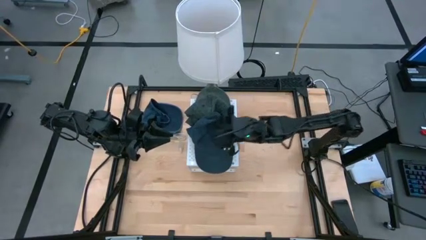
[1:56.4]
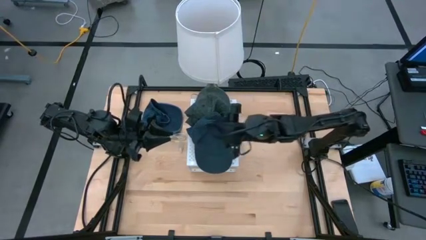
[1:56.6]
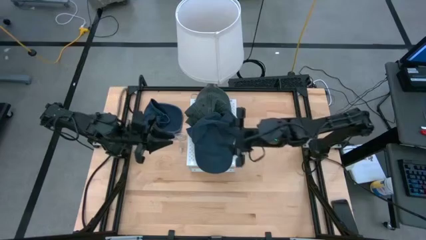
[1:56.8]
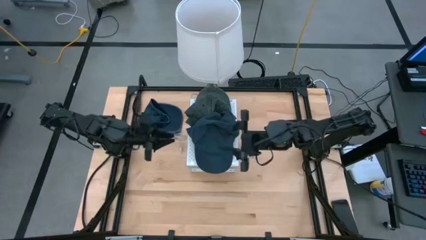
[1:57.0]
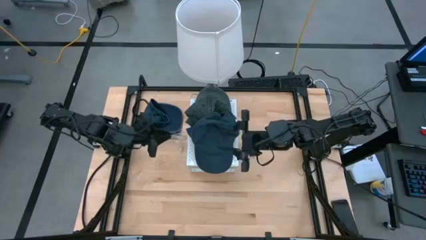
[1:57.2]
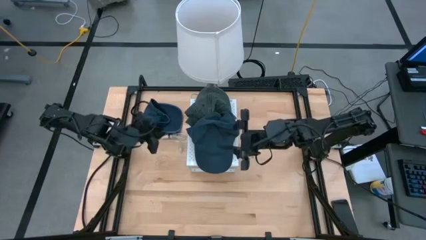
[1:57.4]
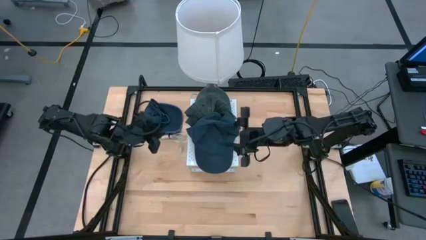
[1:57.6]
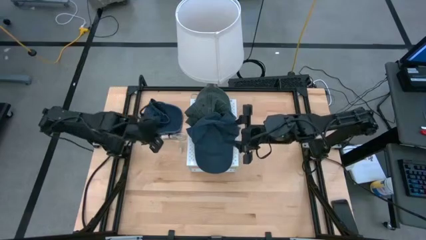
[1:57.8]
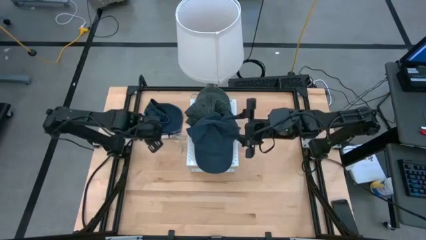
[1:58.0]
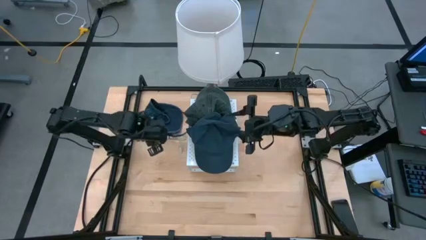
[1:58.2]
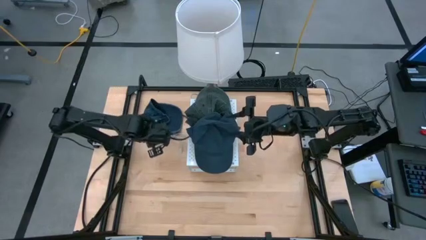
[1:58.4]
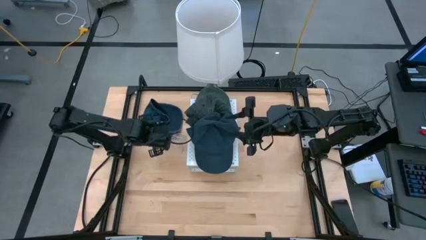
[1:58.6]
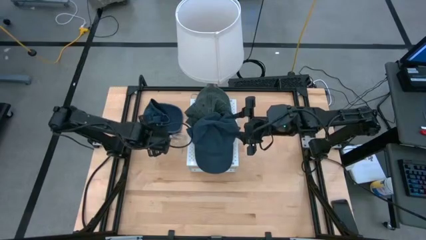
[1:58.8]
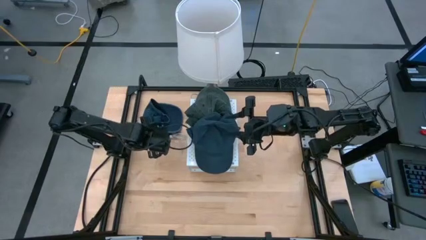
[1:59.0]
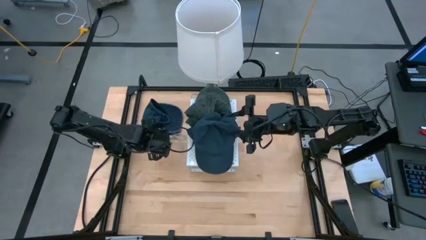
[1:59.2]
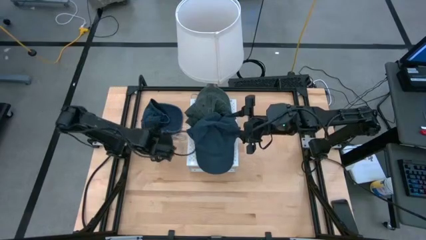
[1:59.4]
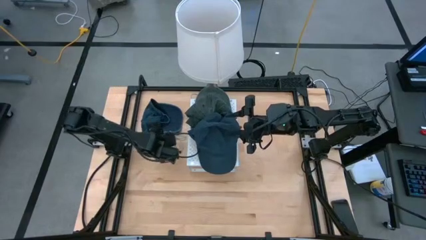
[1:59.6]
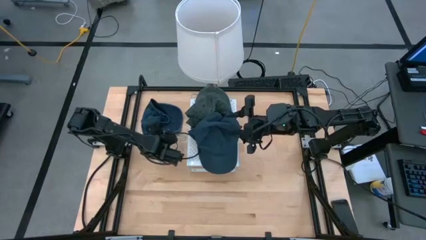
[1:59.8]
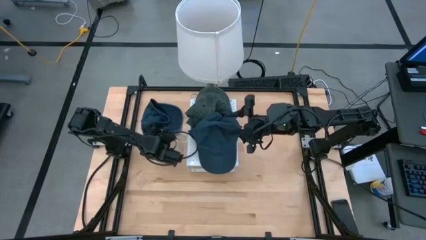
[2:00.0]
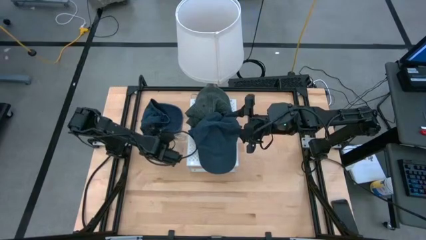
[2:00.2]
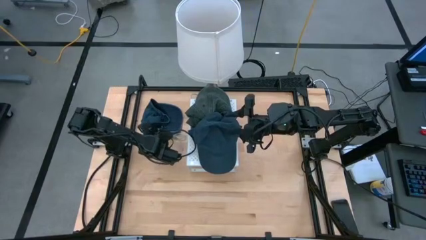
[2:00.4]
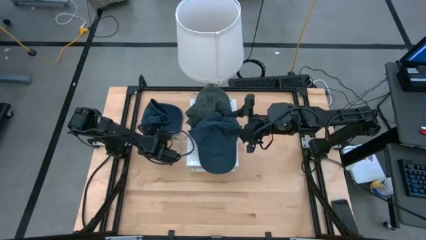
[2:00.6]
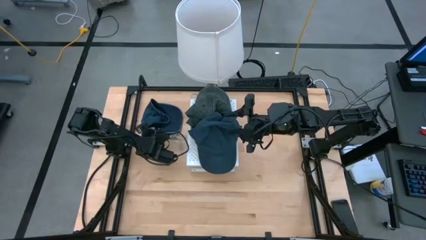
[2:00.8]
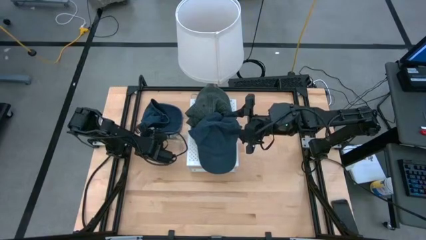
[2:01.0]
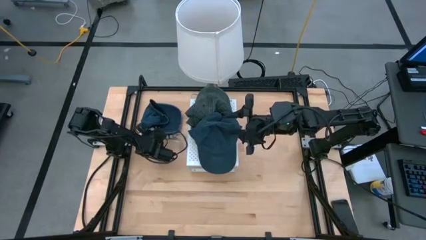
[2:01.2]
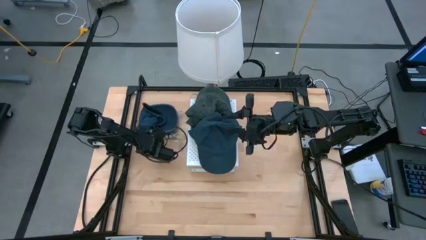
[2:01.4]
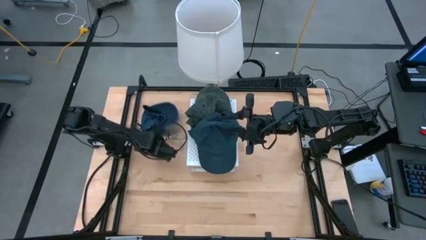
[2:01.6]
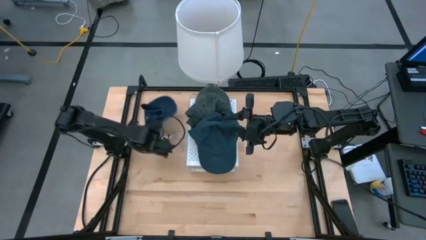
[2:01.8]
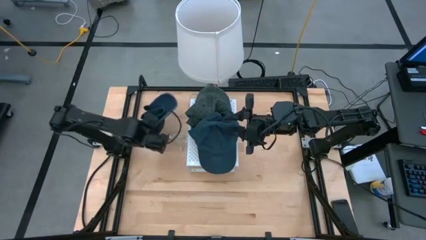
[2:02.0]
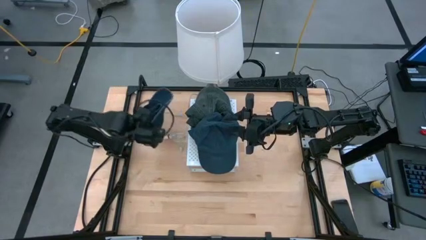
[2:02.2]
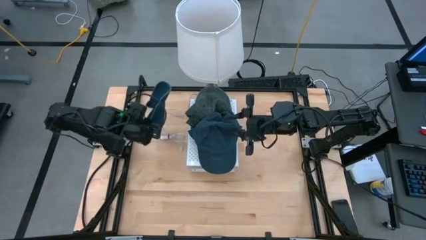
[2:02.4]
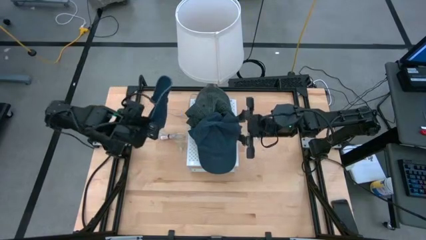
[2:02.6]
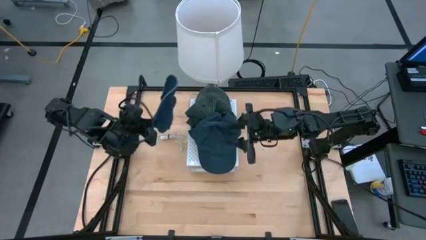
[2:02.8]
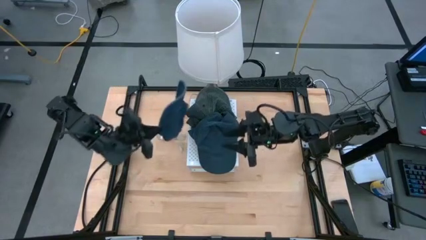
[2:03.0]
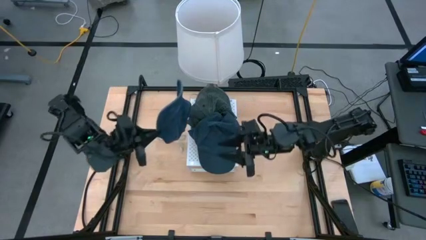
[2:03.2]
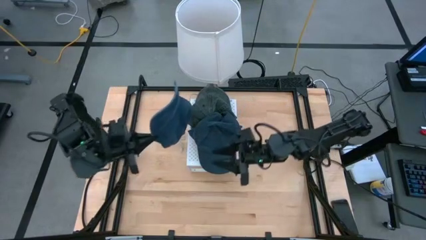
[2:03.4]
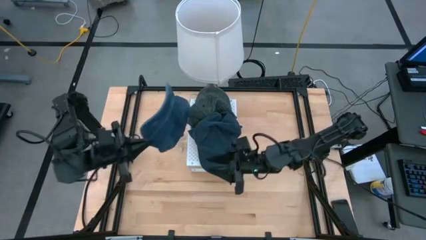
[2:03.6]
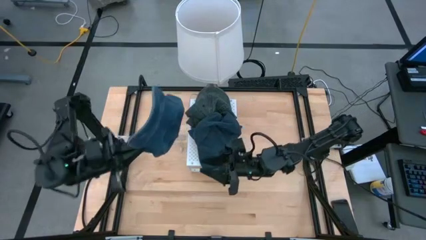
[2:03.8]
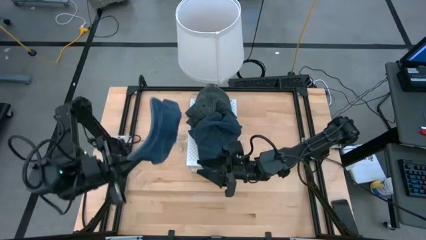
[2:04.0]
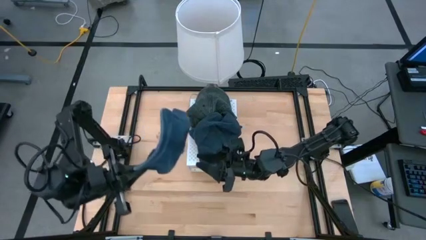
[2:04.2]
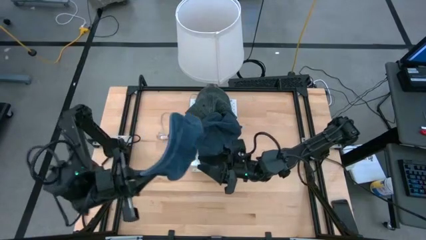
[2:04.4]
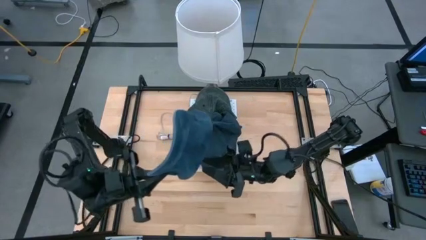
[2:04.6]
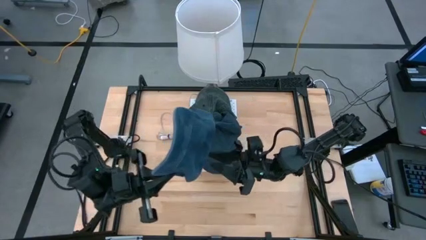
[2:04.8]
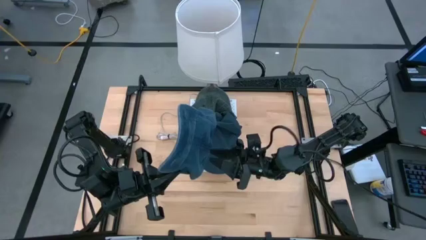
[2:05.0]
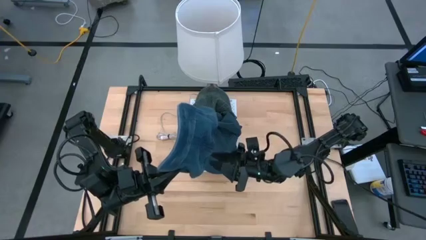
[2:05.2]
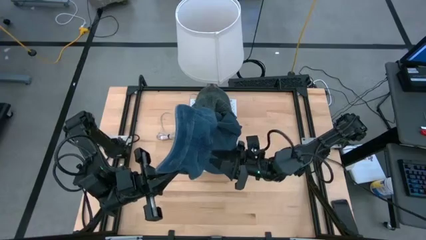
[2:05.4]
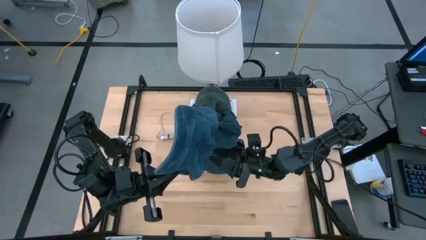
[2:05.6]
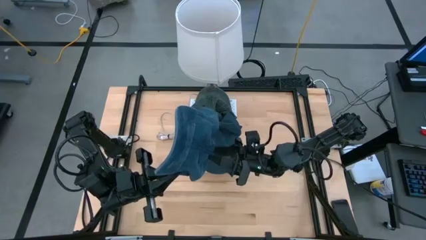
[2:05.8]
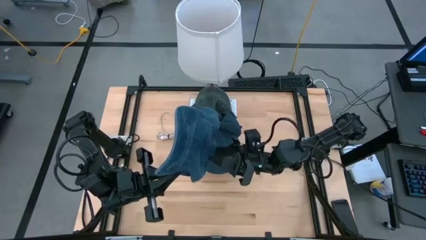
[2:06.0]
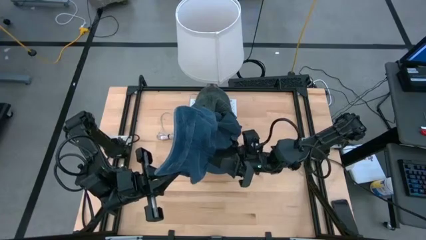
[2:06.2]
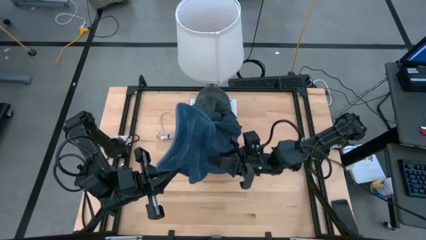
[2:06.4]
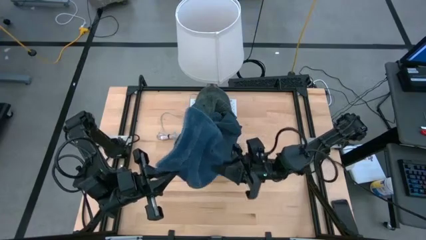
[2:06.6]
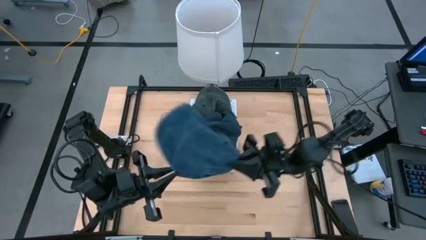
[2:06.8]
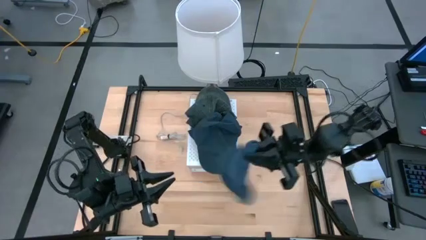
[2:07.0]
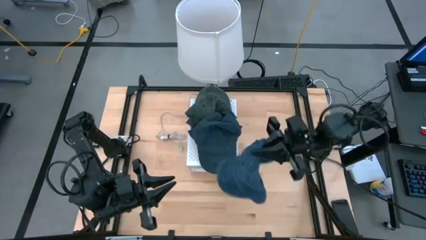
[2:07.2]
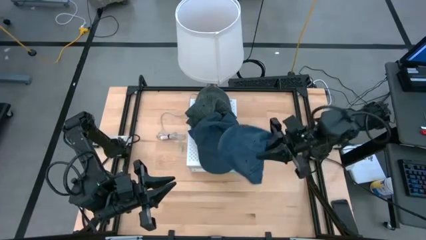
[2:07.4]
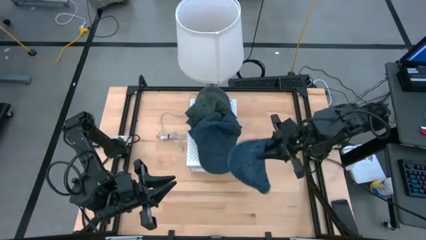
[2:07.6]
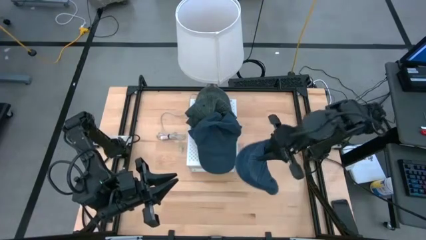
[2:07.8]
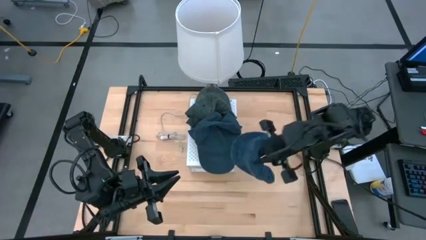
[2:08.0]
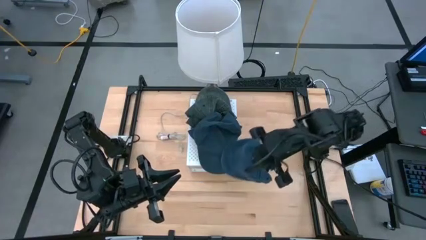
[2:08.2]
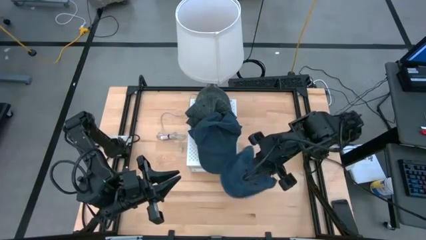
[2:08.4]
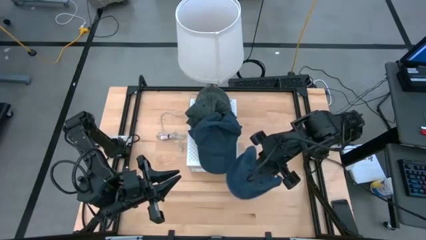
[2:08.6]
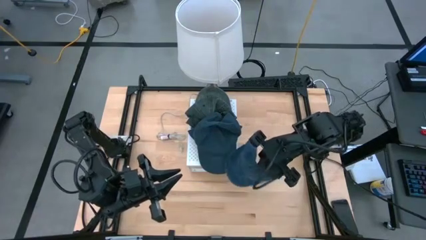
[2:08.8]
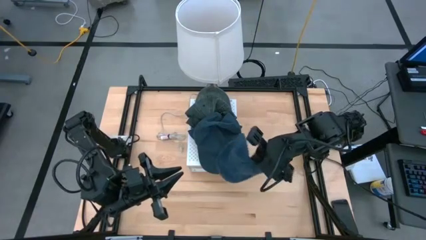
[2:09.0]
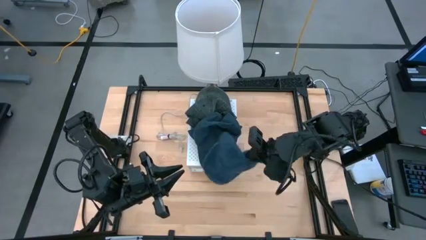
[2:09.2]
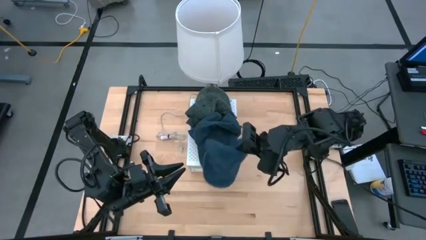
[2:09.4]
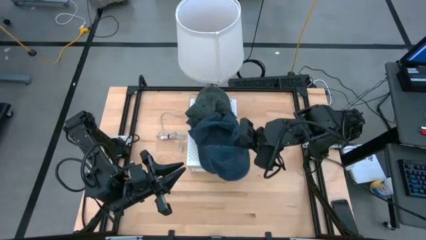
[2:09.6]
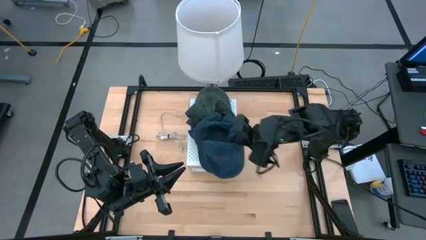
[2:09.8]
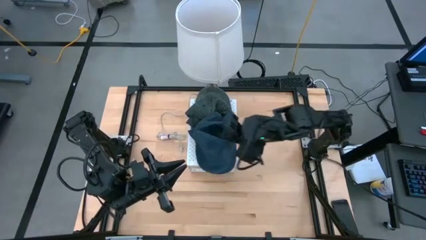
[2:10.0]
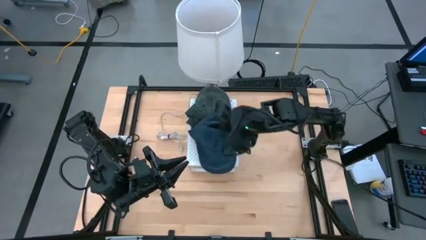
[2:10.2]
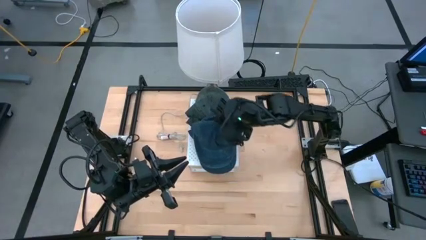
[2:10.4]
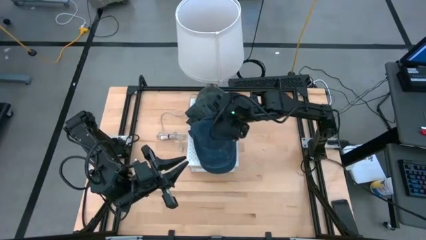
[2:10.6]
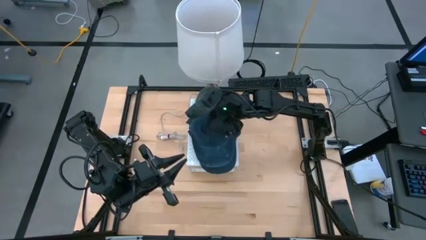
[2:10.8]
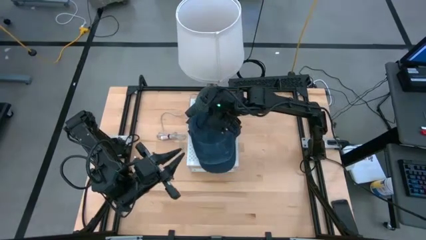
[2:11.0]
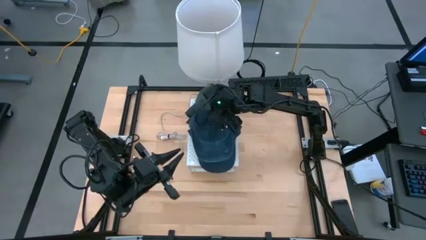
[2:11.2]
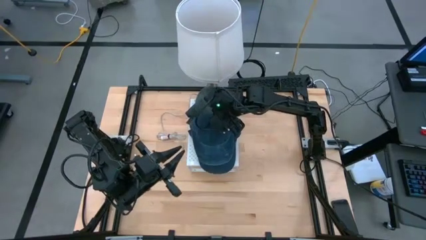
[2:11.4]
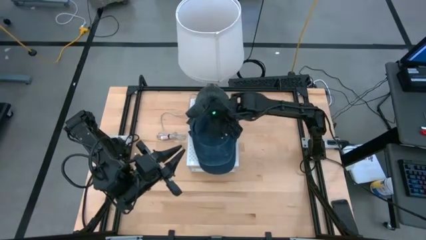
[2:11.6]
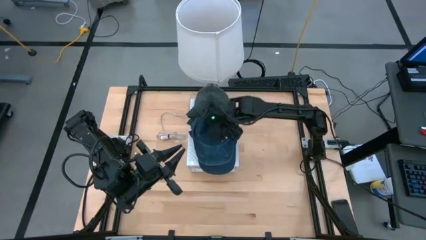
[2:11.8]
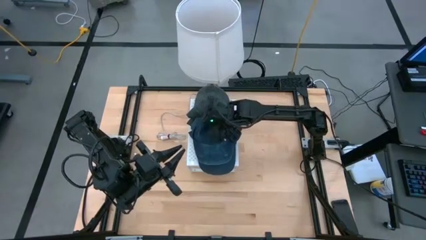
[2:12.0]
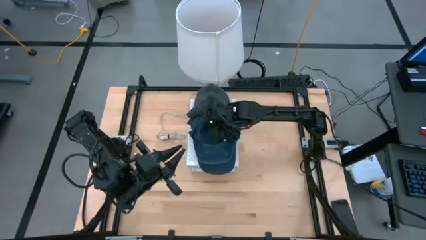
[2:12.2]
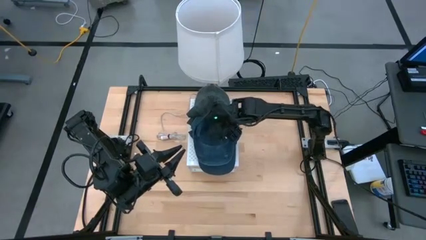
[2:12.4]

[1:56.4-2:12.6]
Task: Pick & Place hat
Stack the blue cap on the blue cap on the shelf
